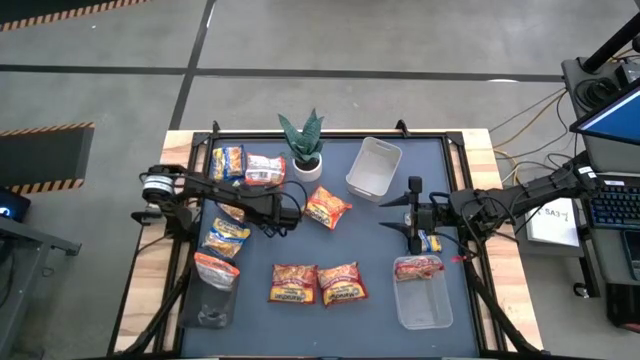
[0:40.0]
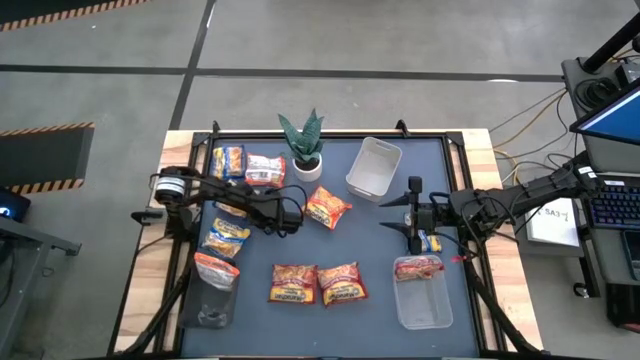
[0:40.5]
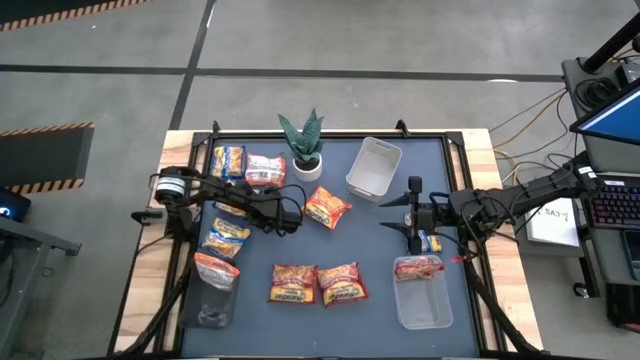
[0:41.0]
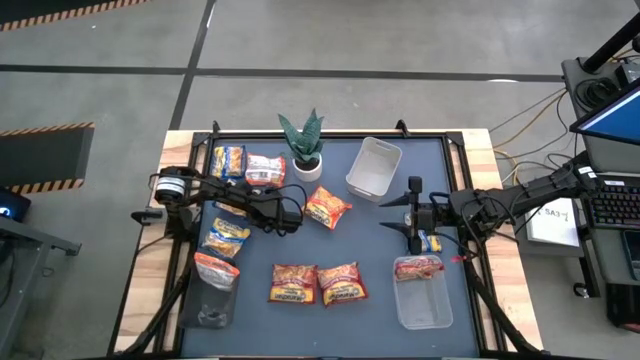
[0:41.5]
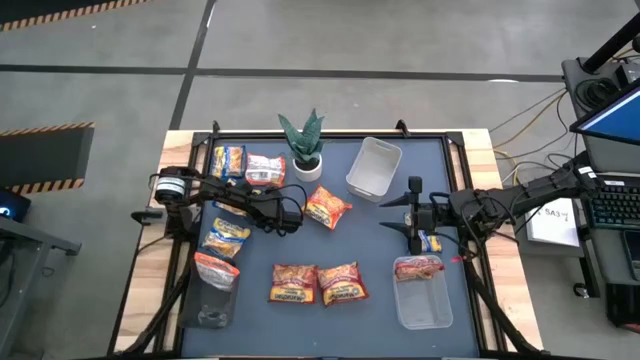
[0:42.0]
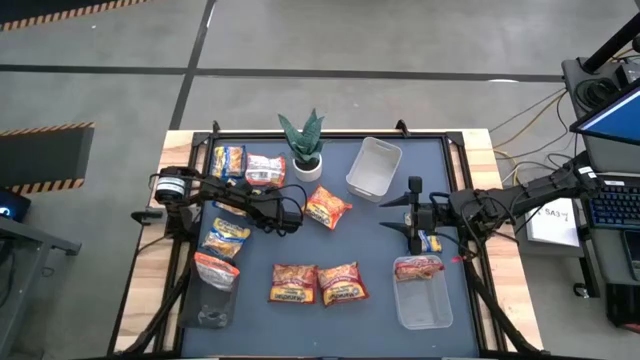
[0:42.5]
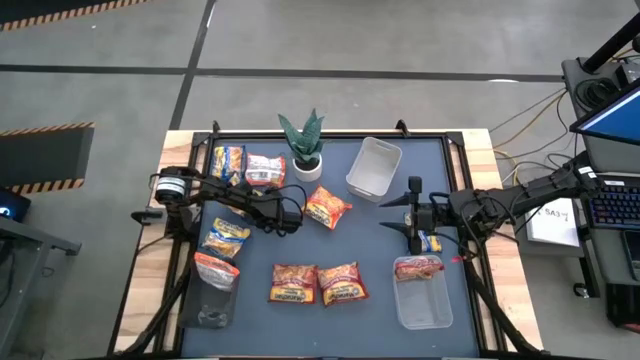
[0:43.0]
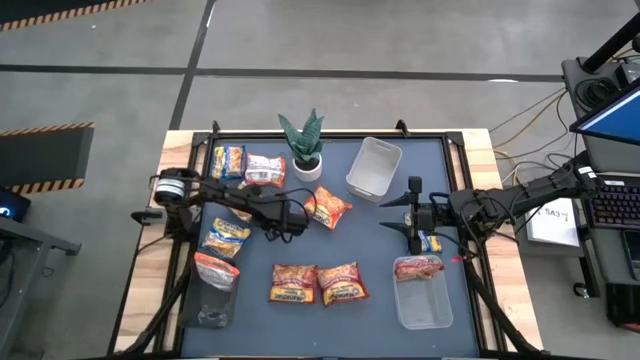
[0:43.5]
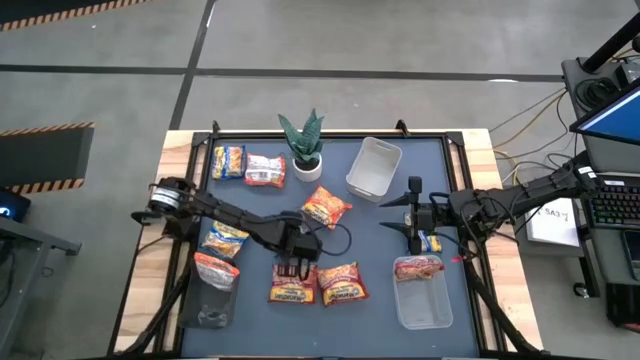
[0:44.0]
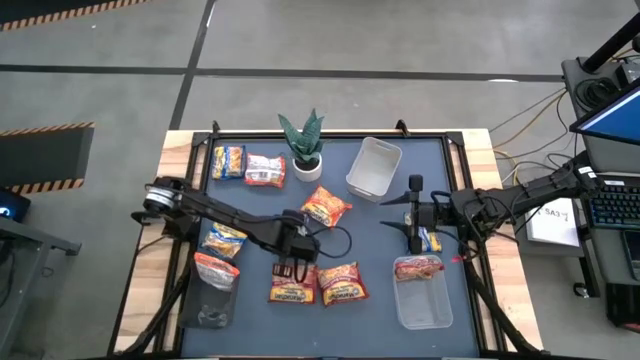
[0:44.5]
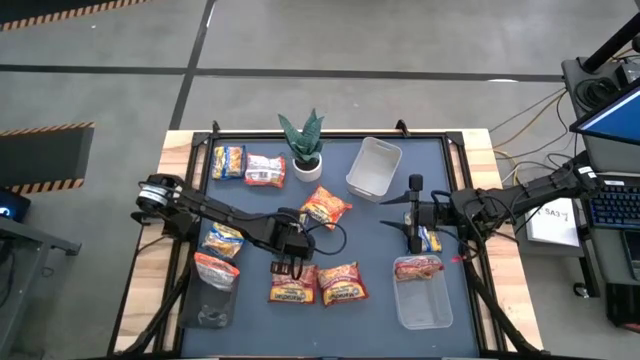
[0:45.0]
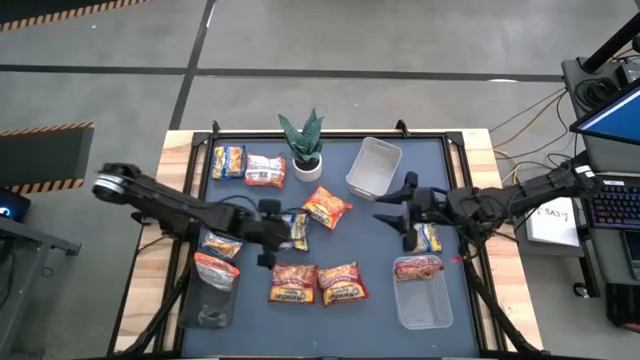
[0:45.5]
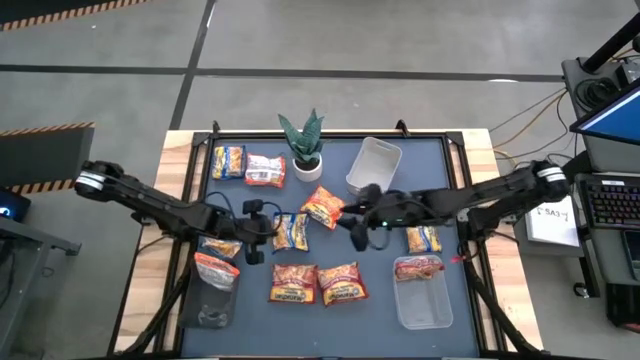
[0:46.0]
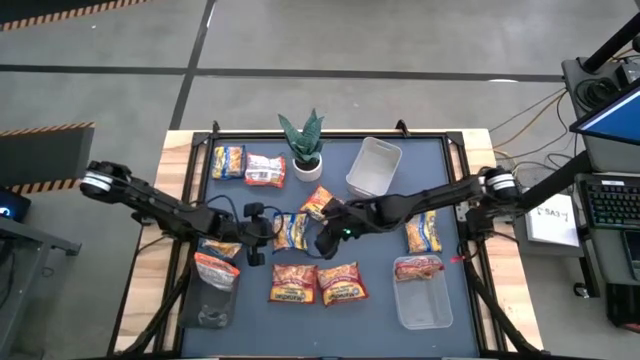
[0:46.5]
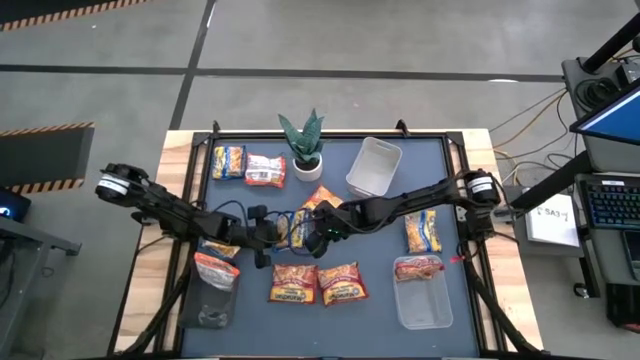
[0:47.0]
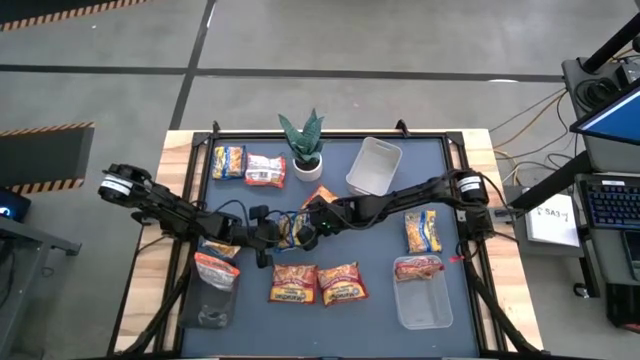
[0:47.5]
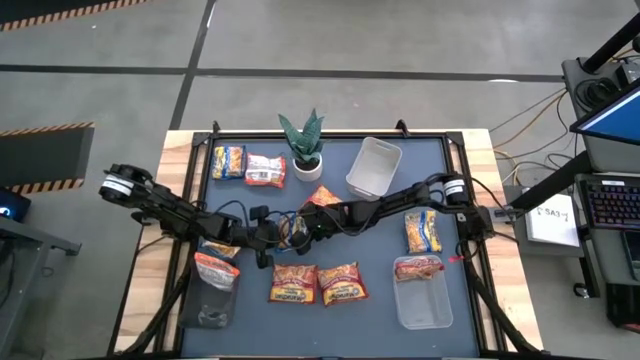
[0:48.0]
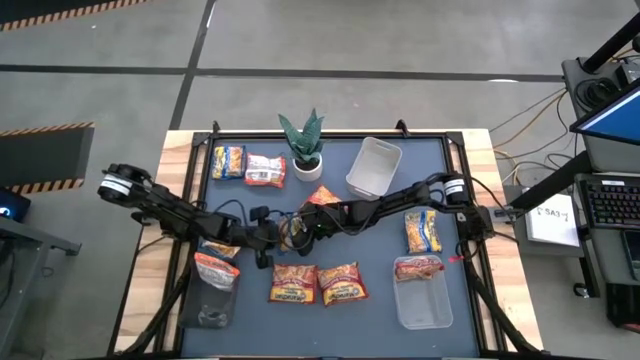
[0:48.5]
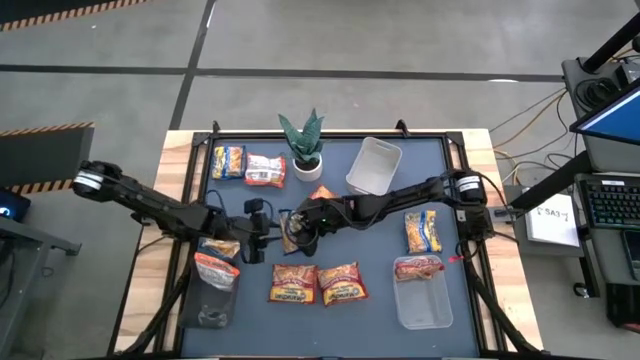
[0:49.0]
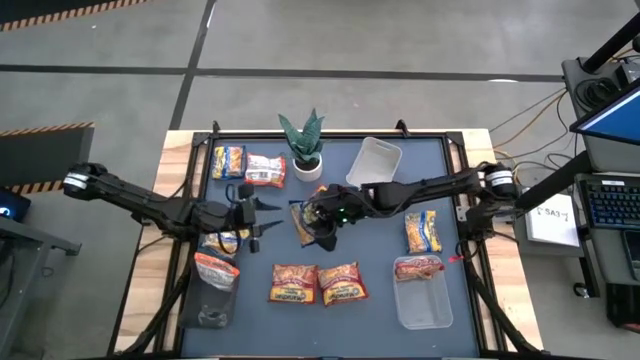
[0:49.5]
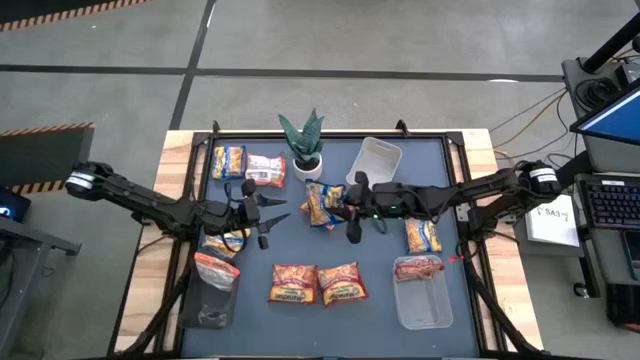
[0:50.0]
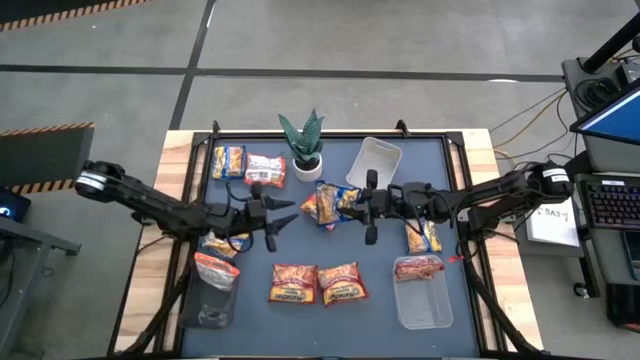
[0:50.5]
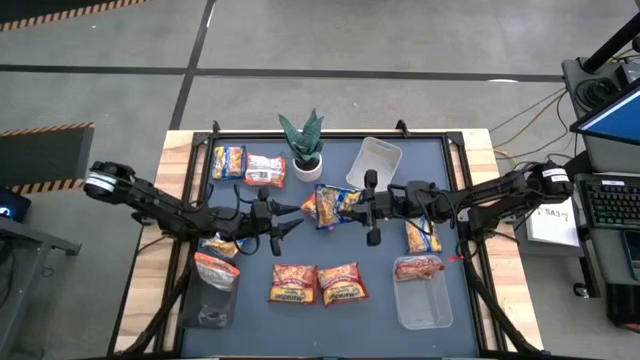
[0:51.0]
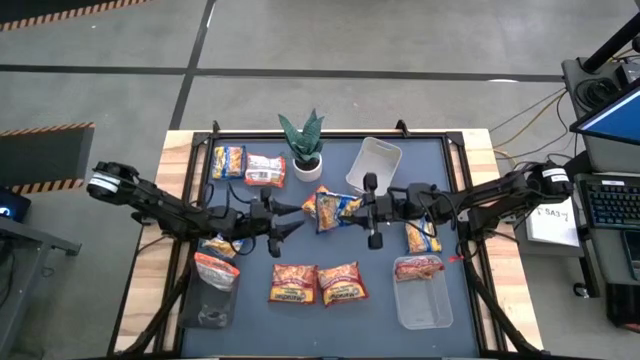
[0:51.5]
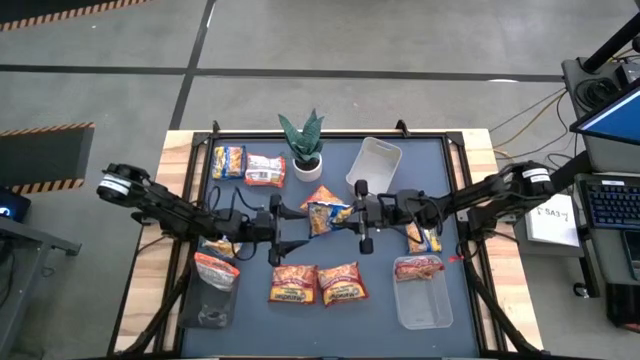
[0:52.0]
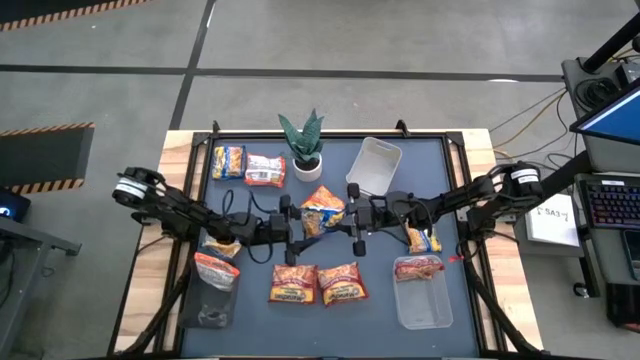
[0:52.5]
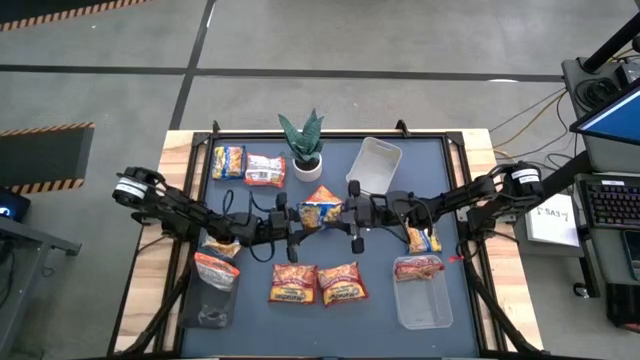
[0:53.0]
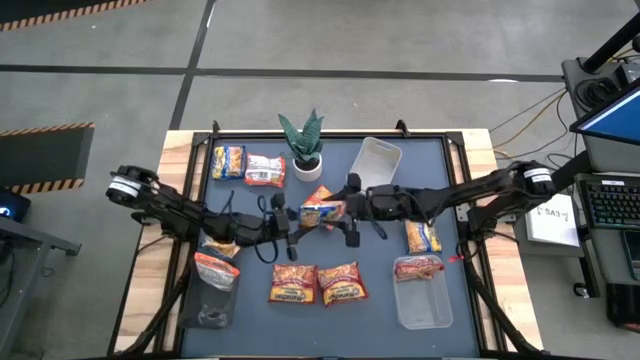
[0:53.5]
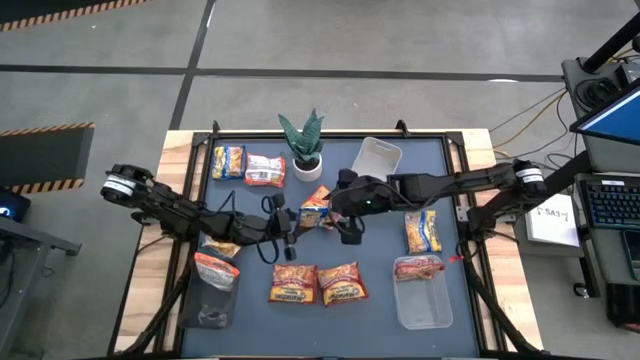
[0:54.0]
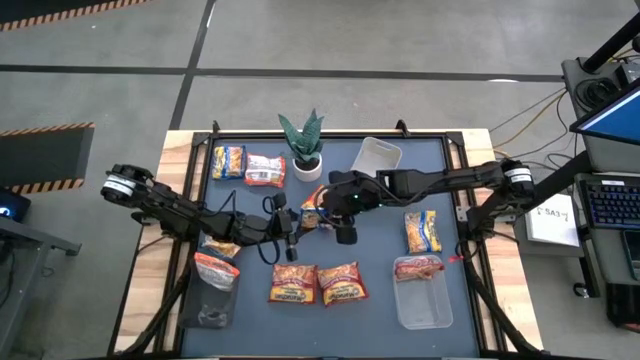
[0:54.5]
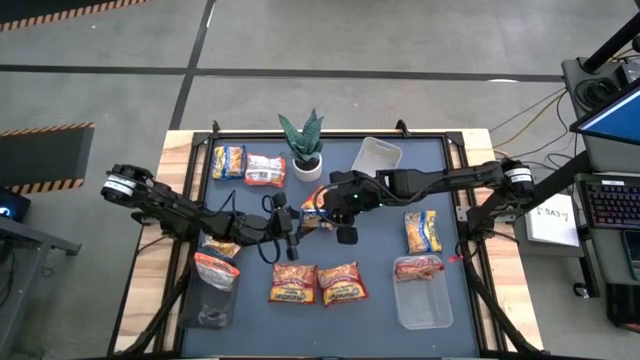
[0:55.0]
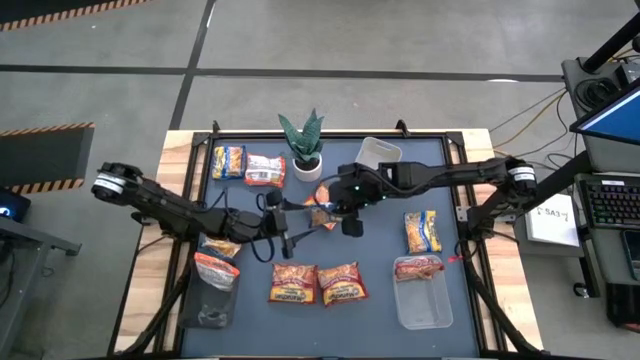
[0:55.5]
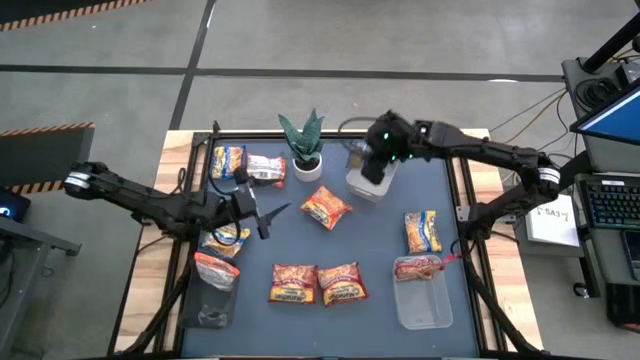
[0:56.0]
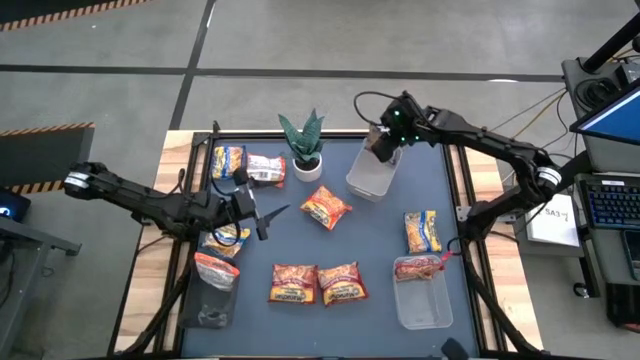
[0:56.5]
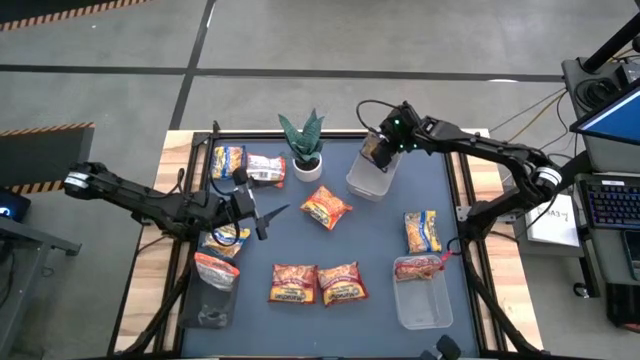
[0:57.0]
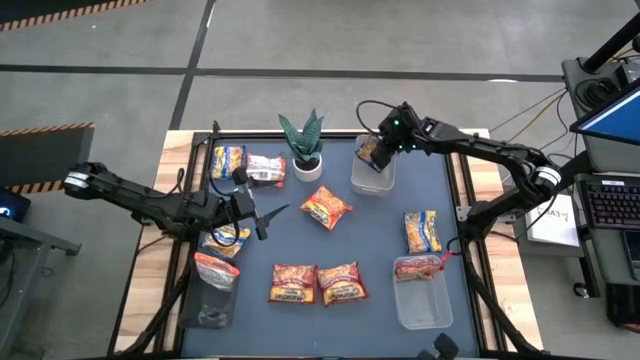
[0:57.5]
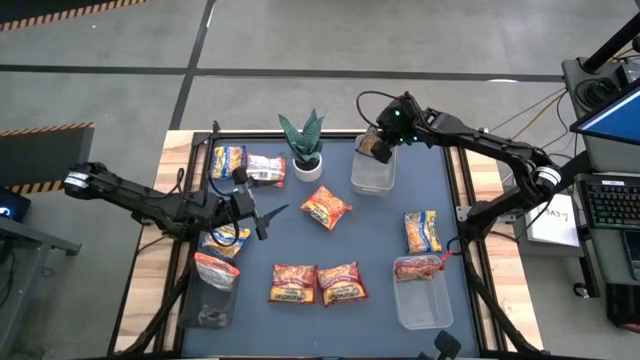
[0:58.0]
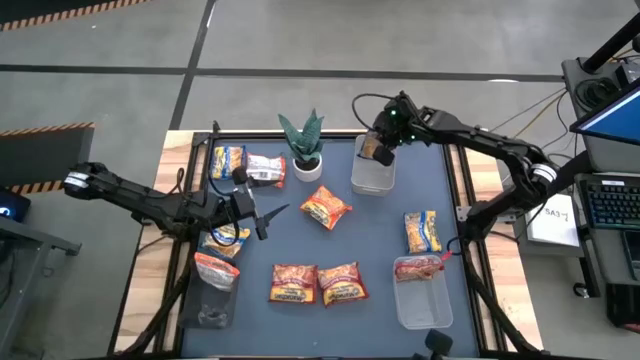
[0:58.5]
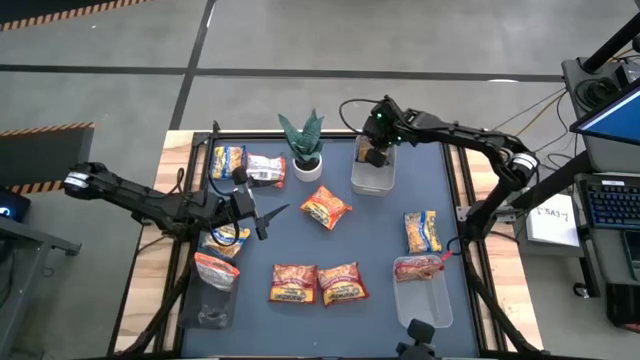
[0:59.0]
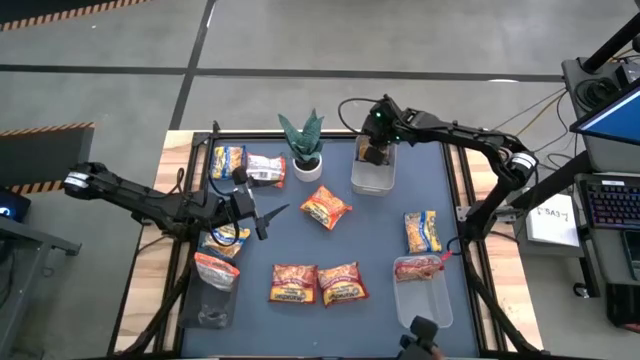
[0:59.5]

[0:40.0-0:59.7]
Task: Sort Maruchan noodles
Put the middle left blue instant noodle pack into the gray bin
